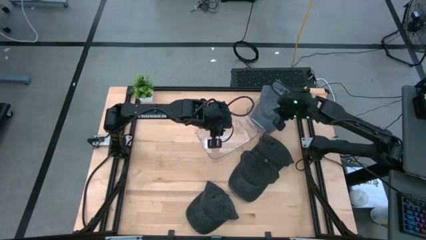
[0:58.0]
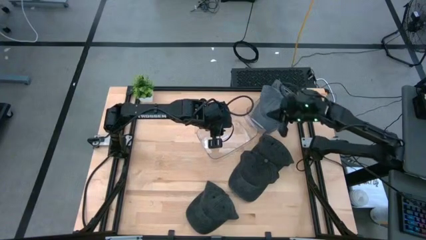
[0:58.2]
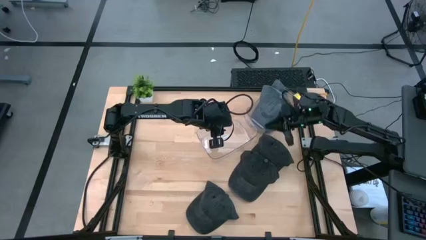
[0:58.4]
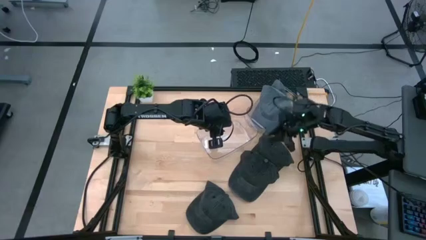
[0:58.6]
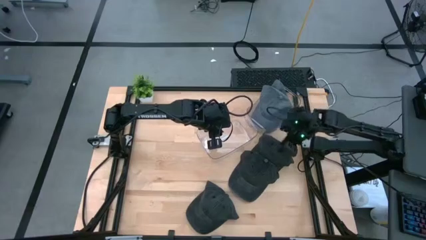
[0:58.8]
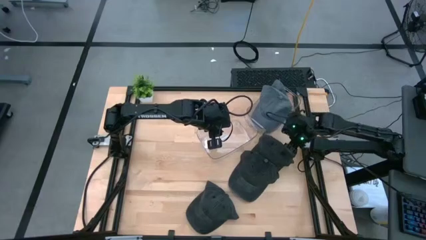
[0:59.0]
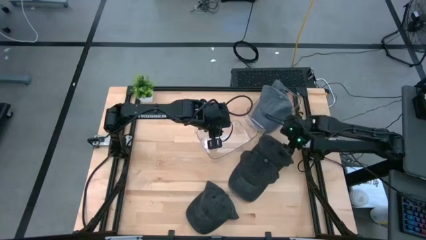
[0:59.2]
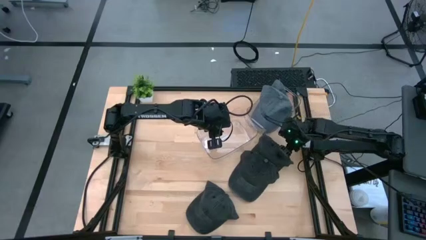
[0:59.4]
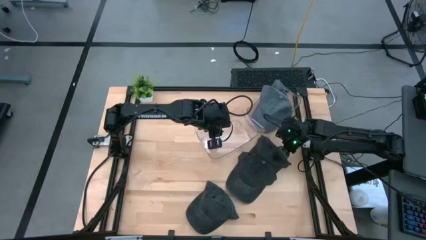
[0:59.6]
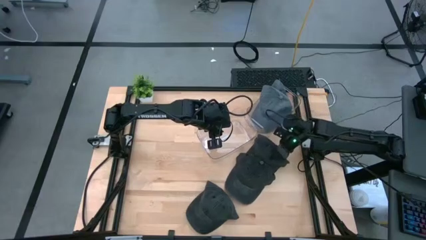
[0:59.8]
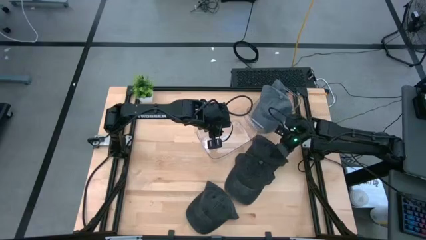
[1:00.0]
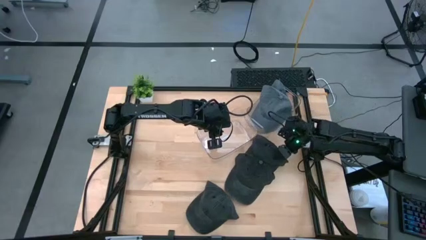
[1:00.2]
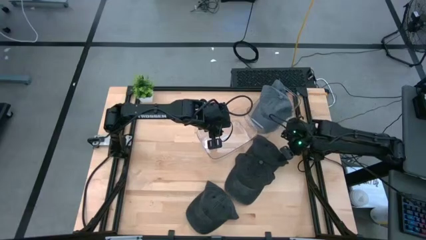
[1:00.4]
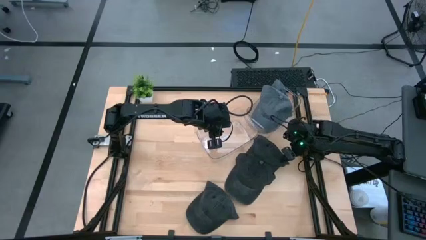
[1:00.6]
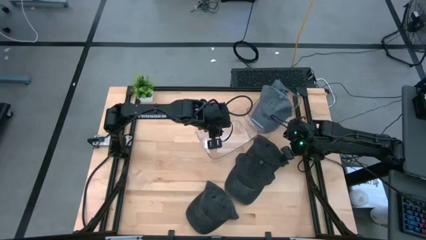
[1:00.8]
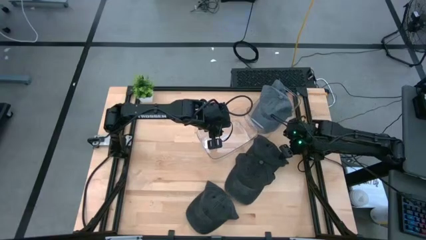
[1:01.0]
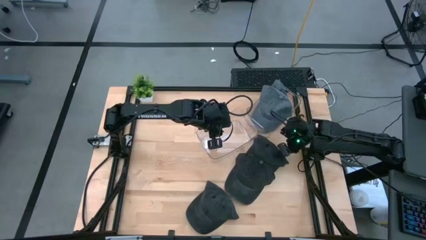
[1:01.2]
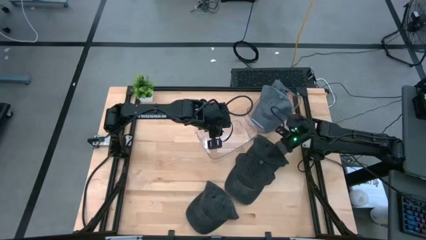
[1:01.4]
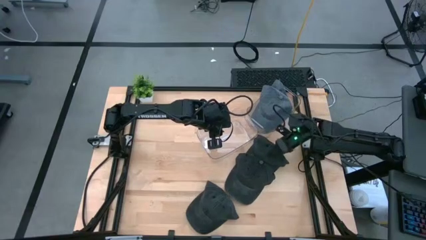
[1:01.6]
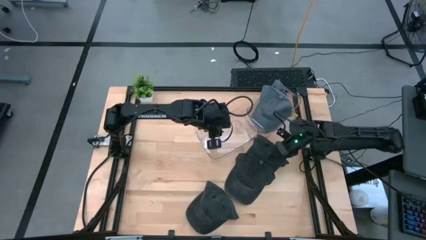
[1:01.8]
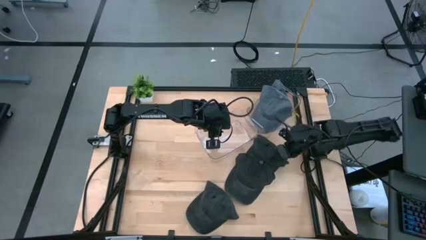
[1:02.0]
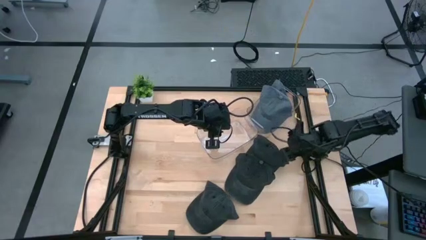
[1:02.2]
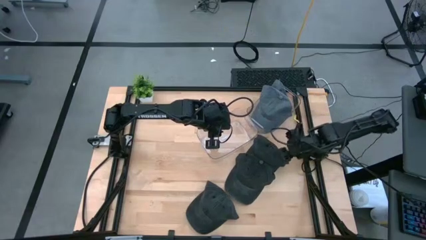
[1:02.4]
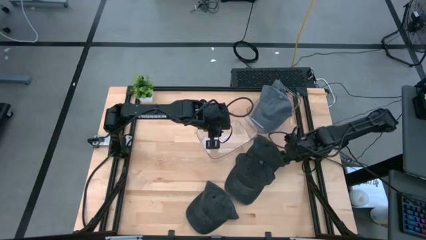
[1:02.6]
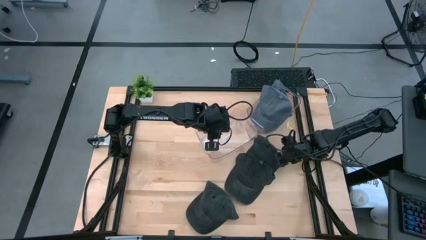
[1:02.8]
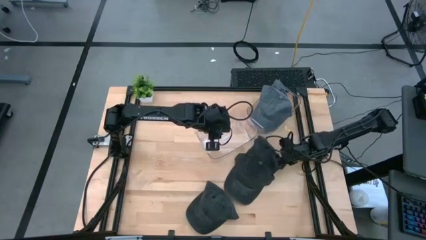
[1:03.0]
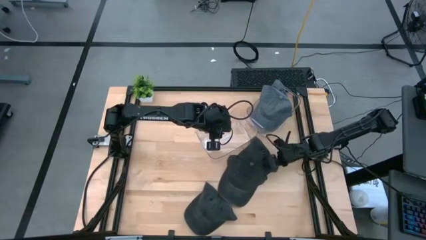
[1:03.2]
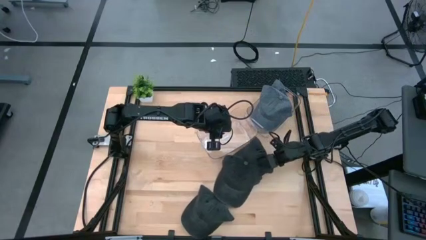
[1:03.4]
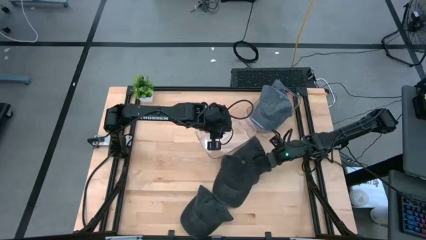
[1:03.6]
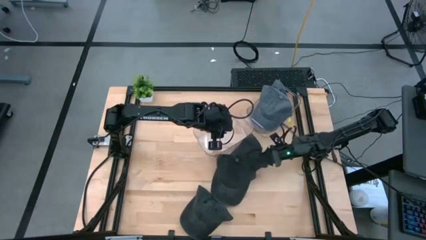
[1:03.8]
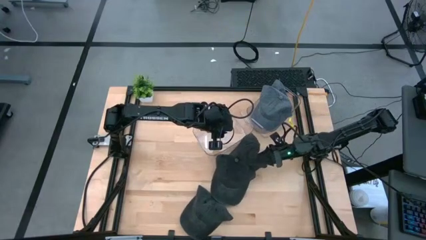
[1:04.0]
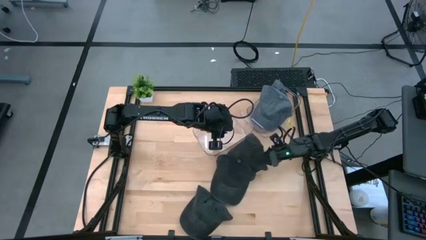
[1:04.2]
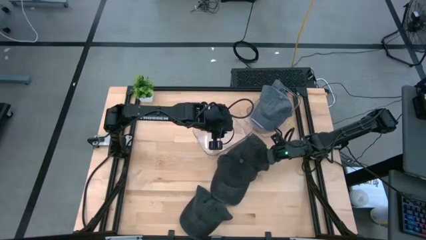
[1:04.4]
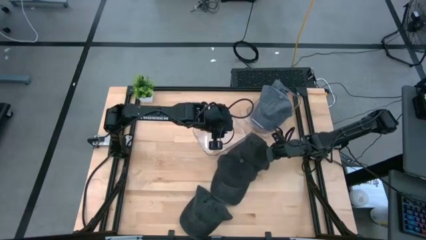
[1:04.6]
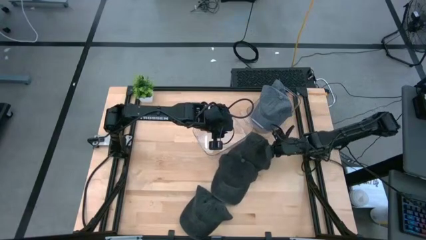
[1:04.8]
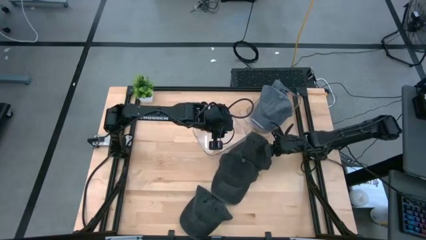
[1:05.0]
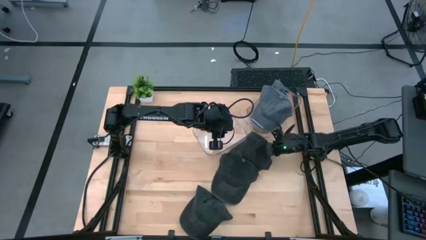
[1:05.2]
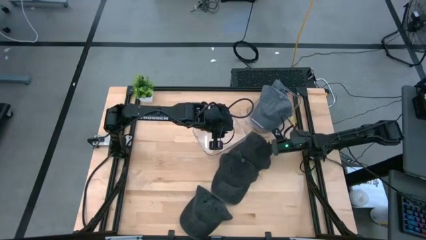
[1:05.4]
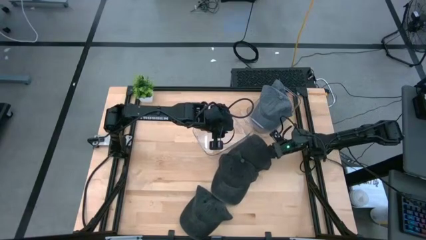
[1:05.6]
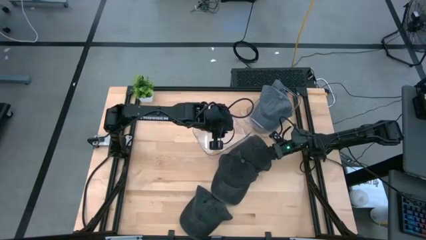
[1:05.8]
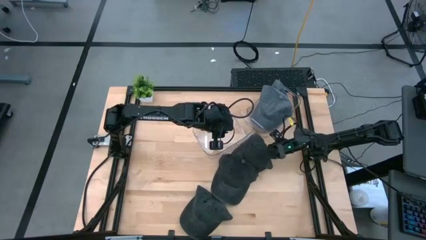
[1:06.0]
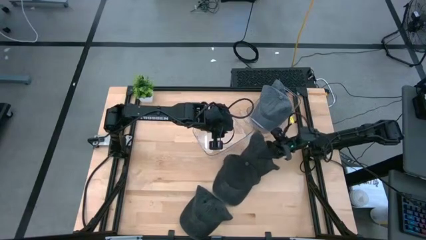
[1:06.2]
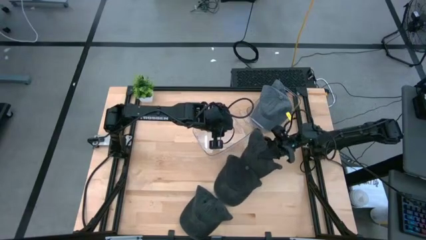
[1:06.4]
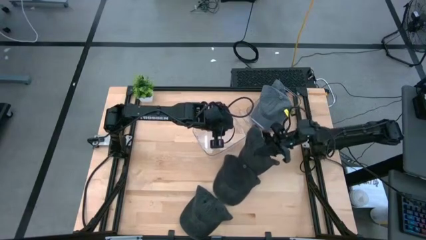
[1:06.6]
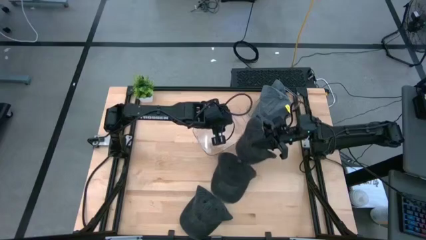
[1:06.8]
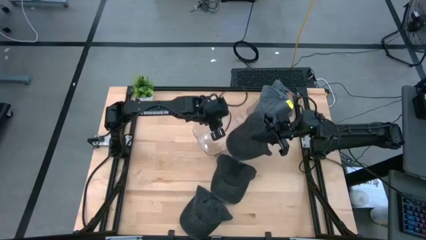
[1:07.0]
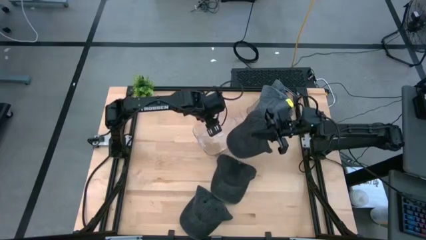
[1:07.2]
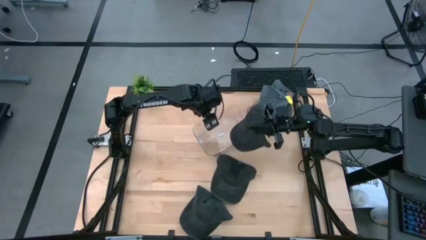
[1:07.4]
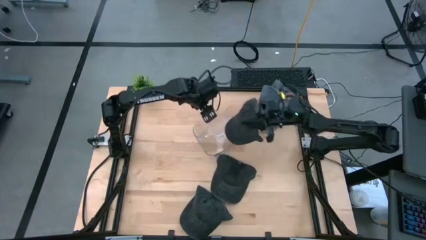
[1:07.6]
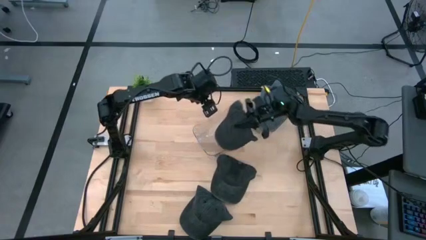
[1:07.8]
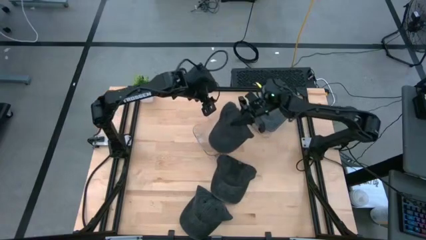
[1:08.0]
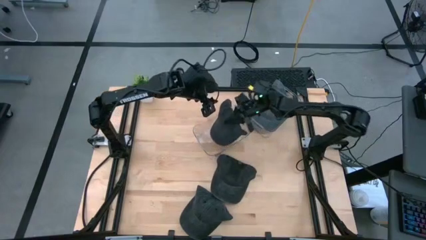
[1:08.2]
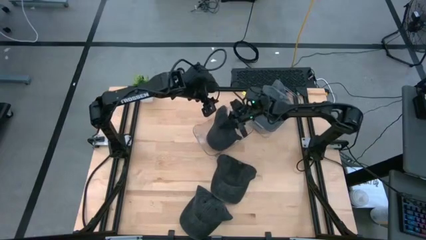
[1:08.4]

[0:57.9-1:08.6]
Task: Pick & Place hat
Put the top black cap into the left transparent bin

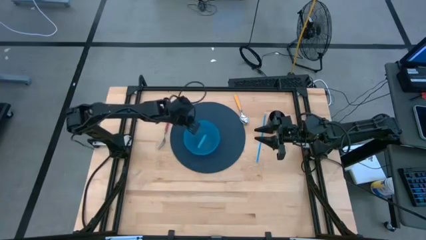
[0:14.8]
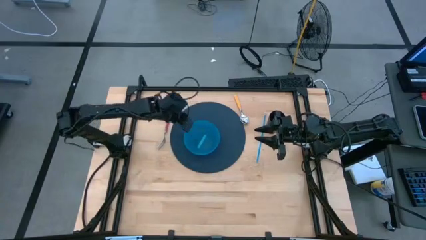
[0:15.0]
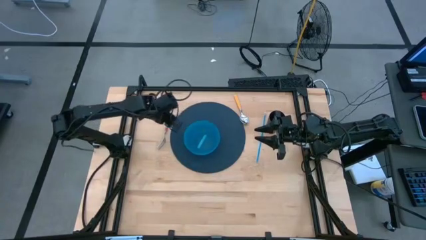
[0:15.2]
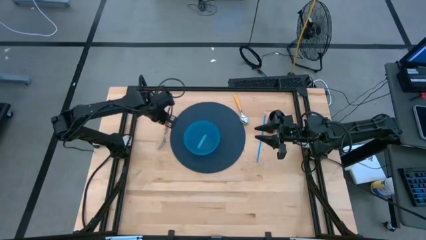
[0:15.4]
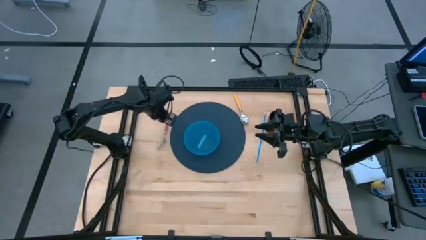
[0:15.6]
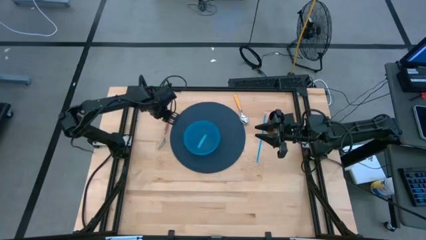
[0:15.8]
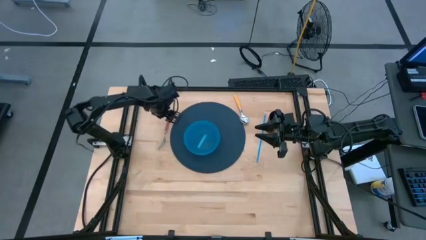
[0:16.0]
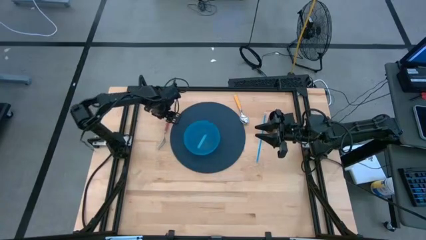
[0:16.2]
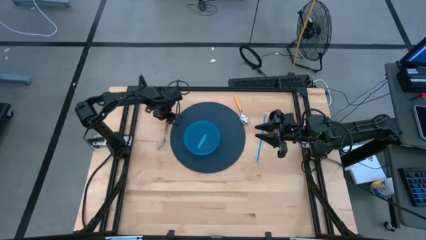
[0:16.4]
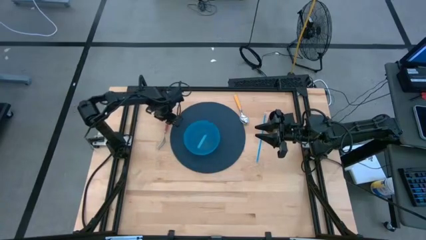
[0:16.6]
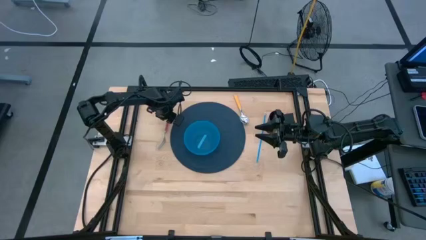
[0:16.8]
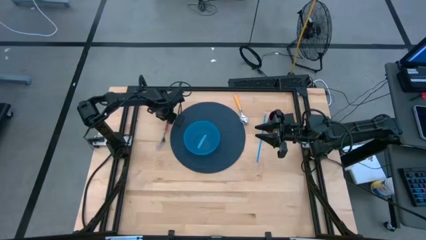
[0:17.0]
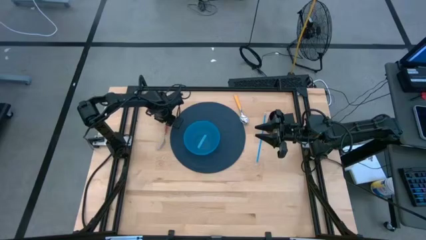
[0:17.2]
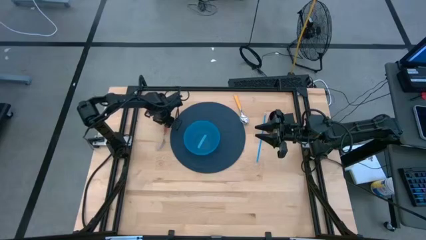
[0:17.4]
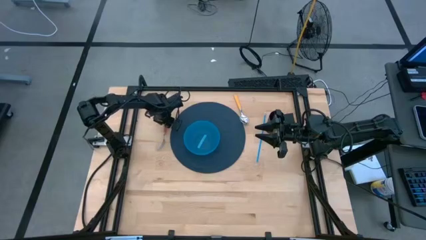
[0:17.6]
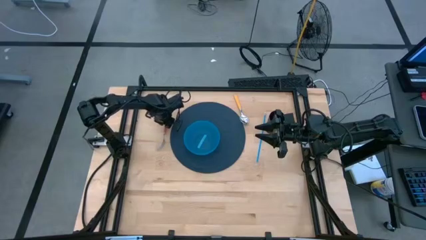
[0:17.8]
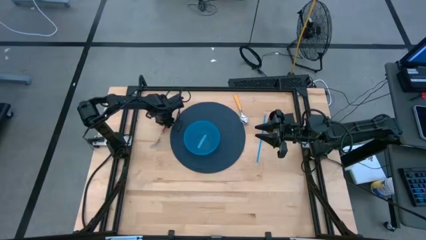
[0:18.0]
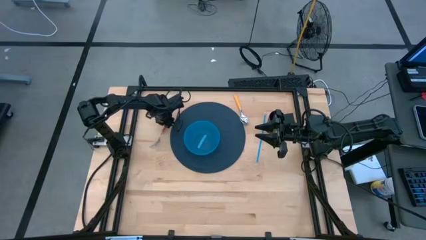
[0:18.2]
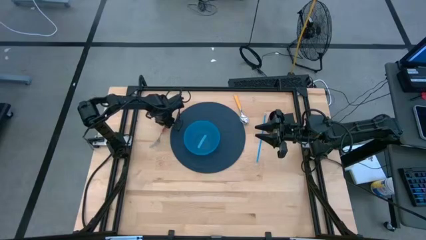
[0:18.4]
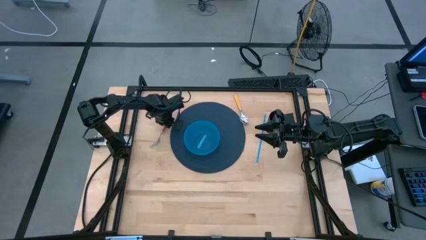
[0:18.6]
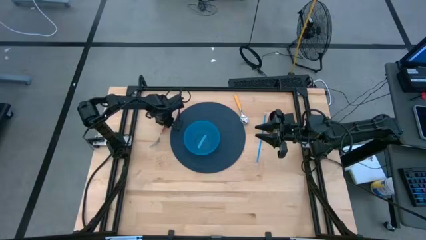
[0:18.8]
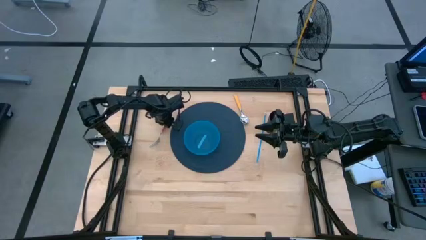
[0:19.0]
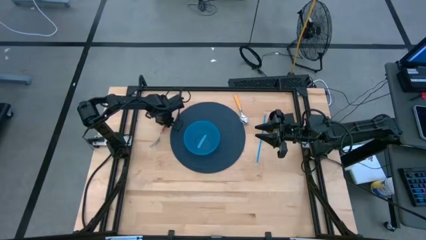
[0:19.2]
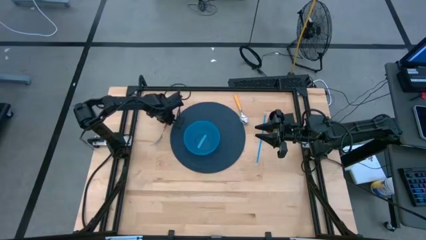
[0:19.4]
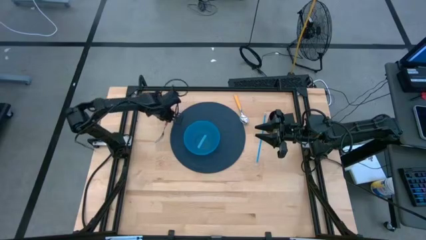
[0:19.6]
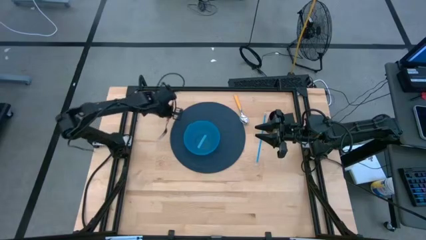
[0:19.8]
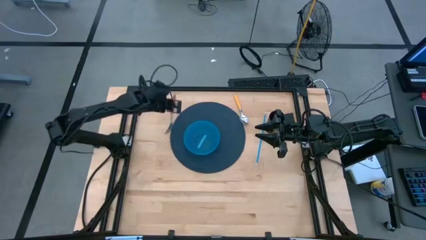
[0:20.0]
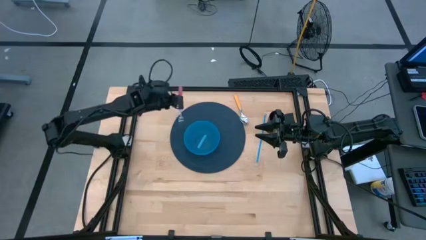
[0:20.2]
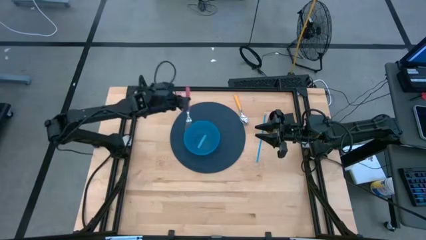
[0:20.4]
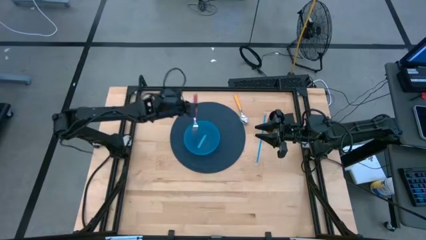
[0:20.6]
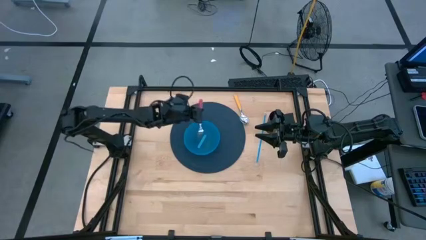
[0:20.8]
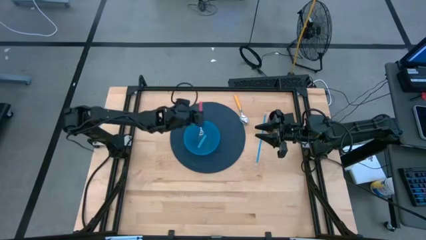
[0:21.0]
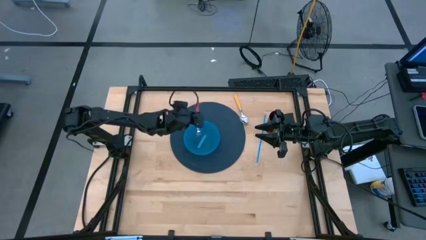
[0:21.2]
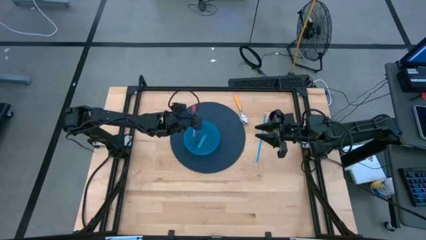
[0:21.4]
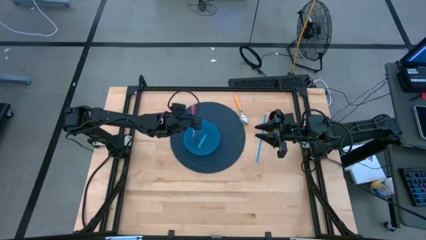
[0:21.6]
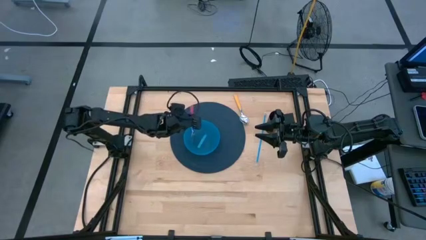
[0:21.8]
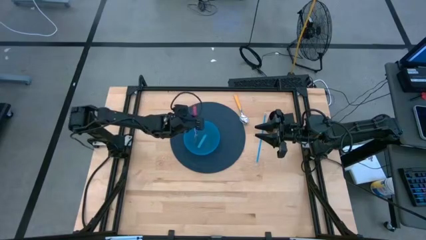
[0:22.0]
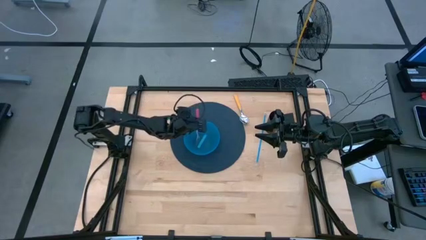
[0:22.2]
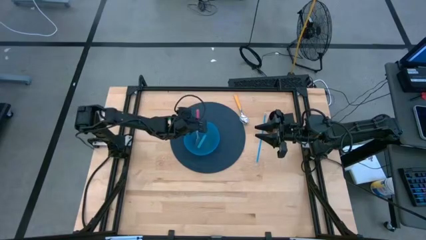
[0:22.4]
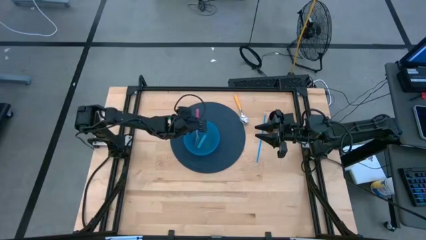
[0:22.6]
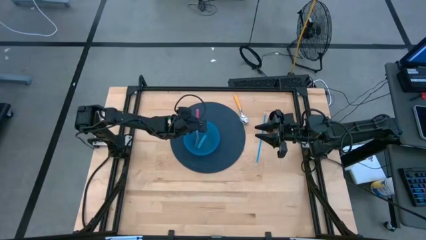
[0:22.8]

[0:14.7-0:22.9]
Task: Pick & Place Utensil
Put the pink fork into the blue bowl on the blue mat
